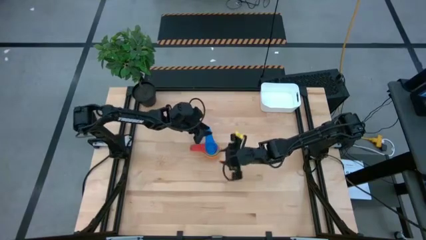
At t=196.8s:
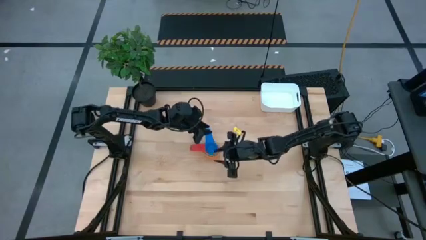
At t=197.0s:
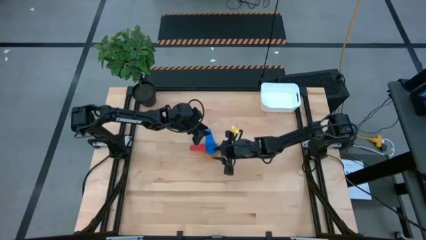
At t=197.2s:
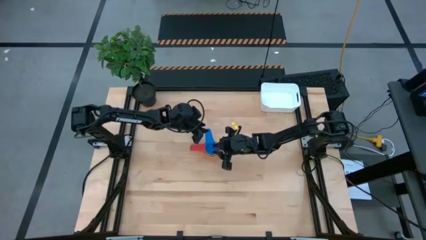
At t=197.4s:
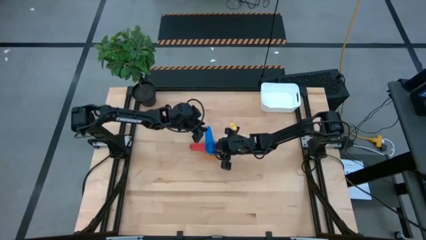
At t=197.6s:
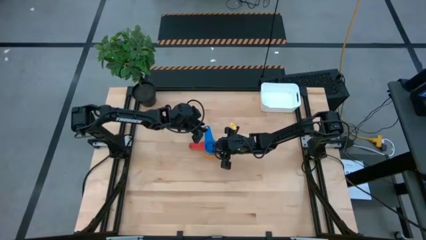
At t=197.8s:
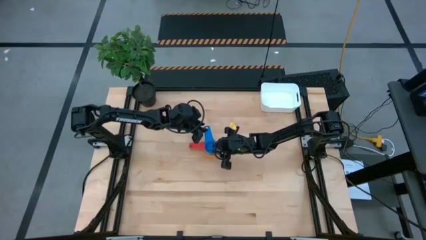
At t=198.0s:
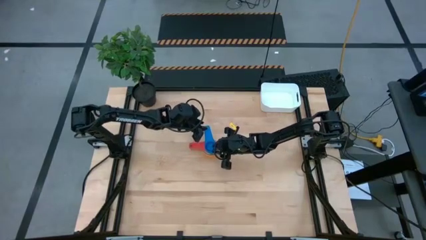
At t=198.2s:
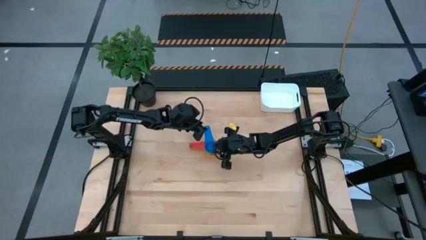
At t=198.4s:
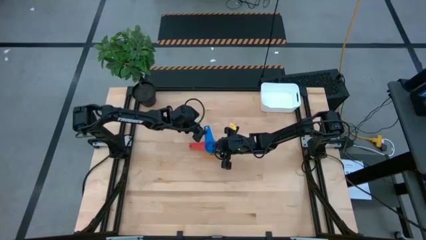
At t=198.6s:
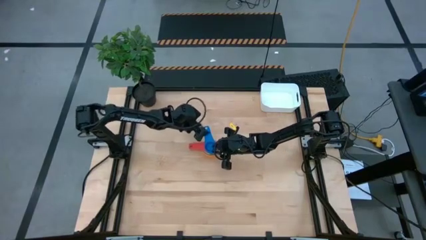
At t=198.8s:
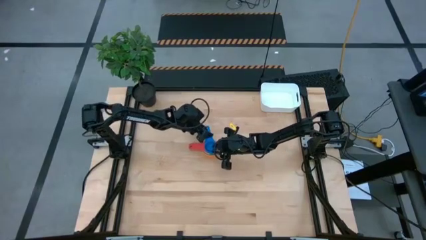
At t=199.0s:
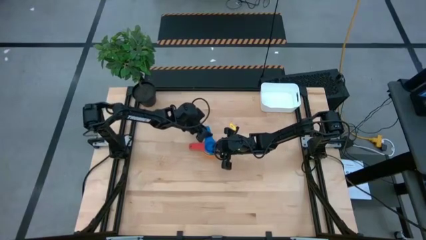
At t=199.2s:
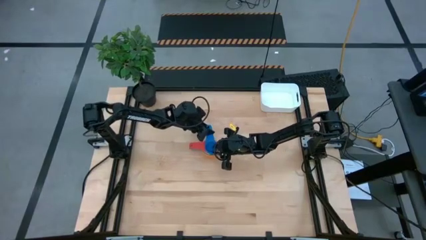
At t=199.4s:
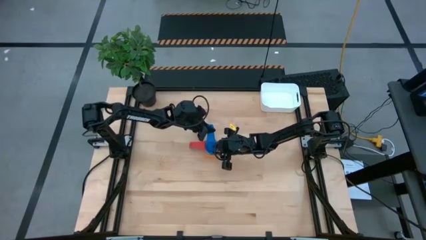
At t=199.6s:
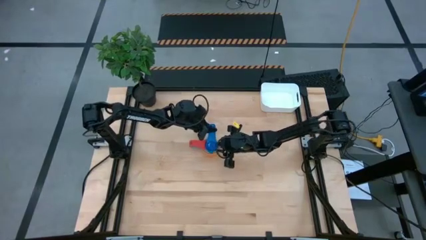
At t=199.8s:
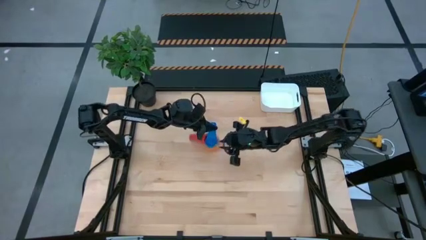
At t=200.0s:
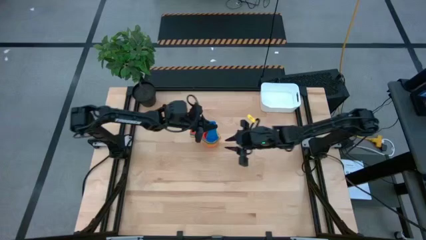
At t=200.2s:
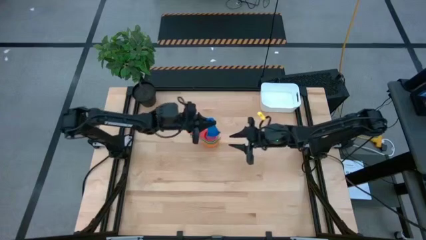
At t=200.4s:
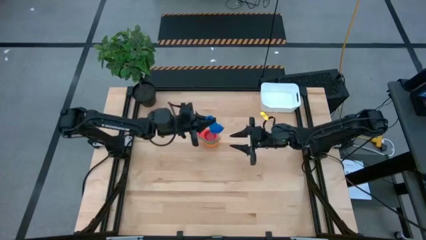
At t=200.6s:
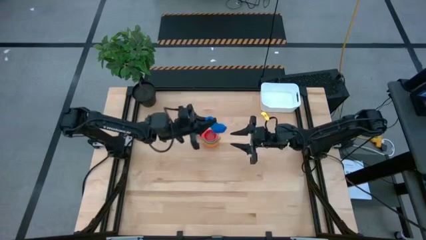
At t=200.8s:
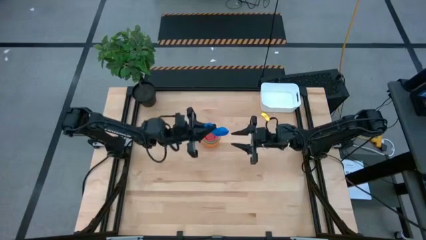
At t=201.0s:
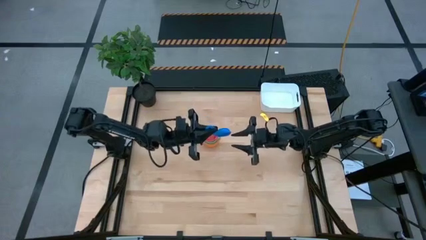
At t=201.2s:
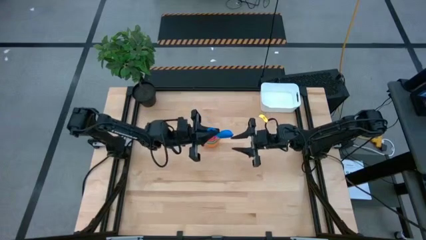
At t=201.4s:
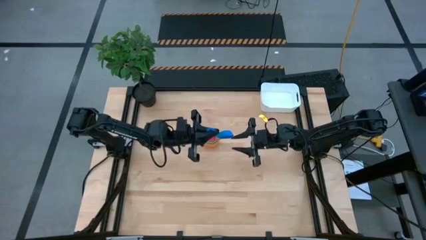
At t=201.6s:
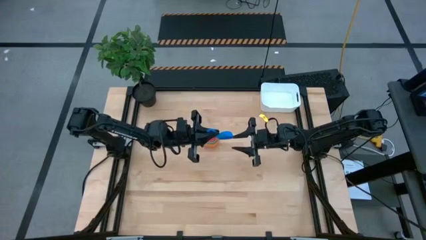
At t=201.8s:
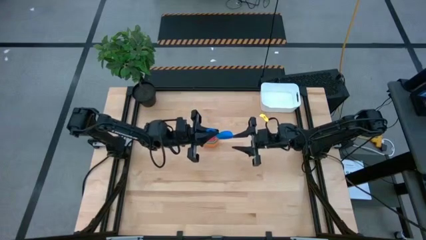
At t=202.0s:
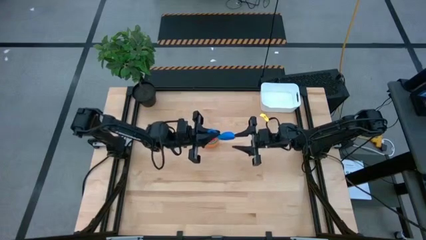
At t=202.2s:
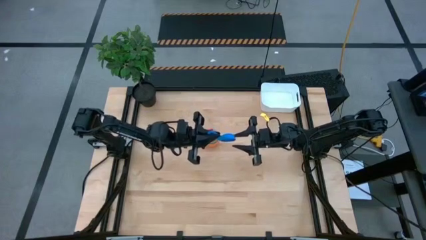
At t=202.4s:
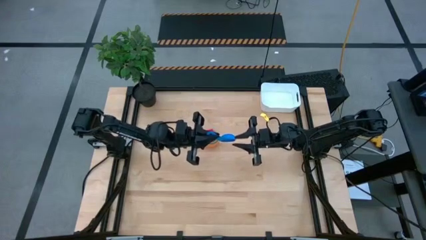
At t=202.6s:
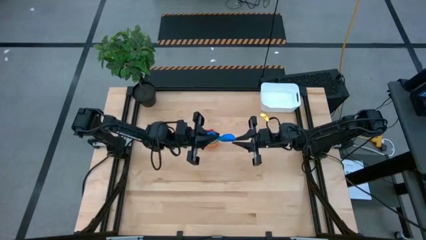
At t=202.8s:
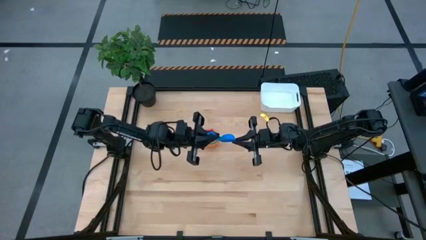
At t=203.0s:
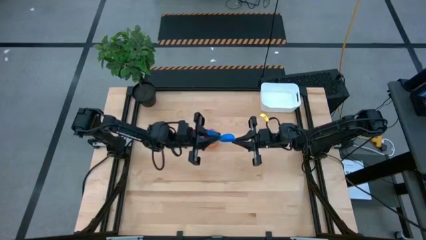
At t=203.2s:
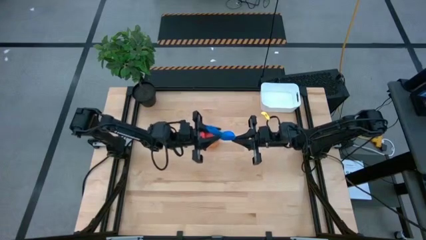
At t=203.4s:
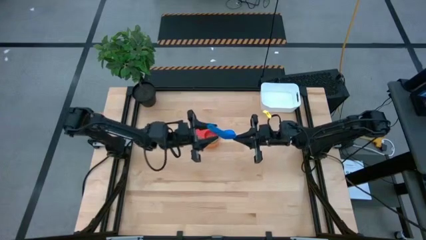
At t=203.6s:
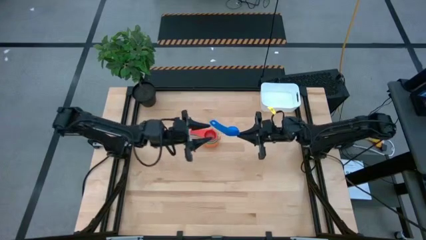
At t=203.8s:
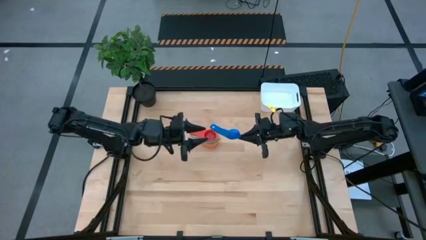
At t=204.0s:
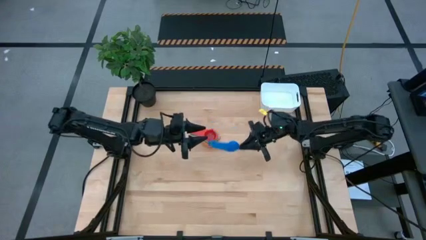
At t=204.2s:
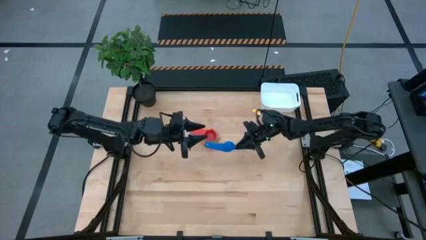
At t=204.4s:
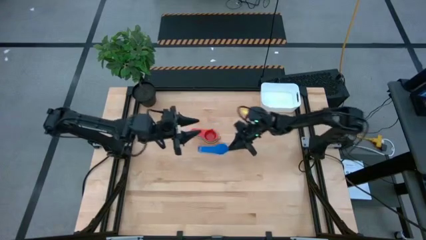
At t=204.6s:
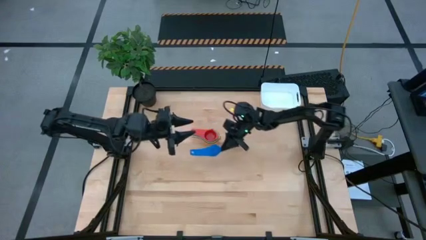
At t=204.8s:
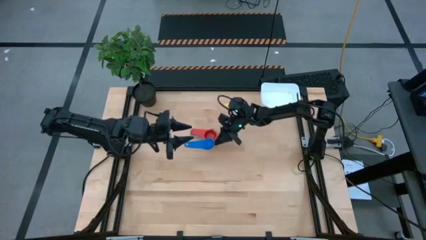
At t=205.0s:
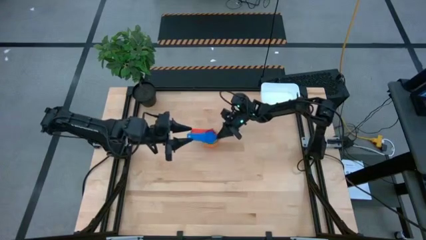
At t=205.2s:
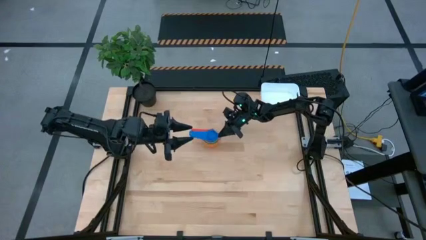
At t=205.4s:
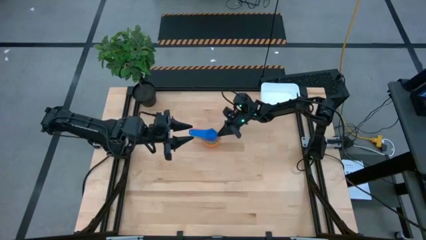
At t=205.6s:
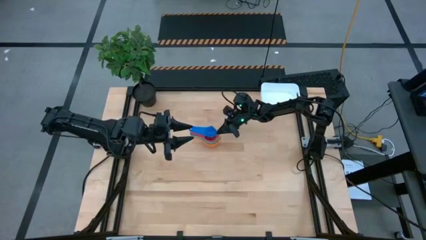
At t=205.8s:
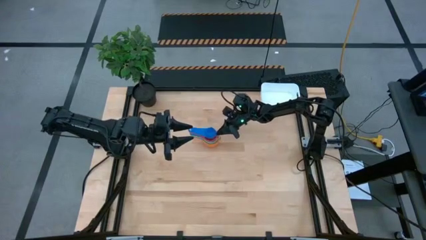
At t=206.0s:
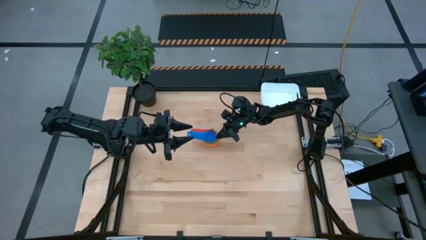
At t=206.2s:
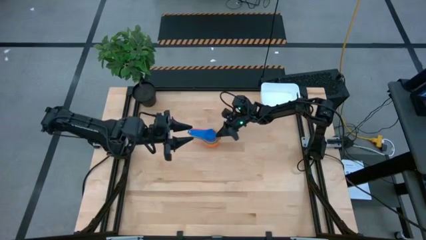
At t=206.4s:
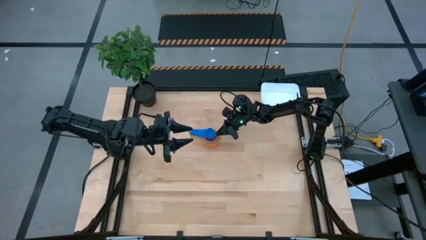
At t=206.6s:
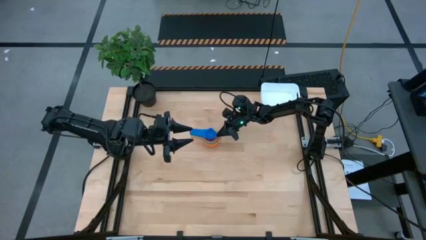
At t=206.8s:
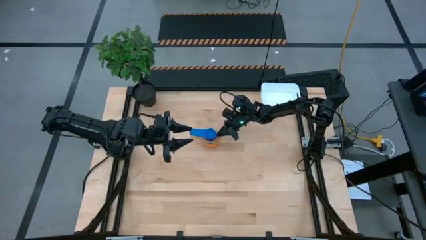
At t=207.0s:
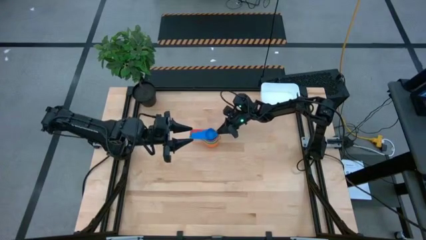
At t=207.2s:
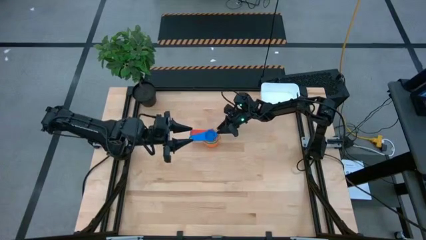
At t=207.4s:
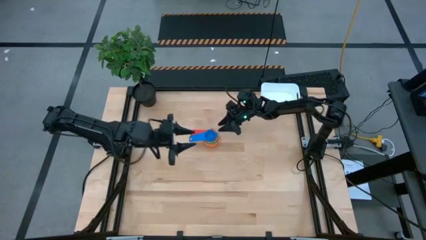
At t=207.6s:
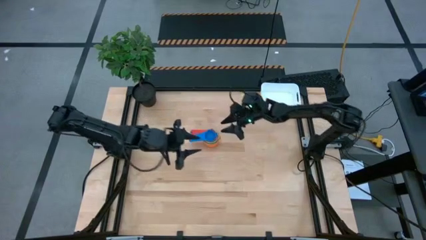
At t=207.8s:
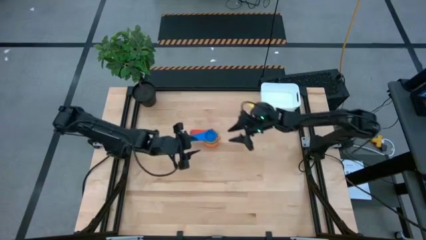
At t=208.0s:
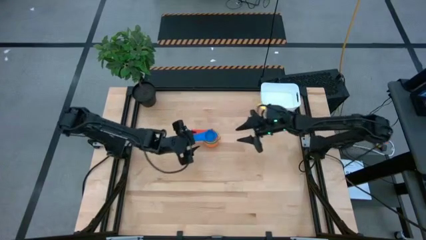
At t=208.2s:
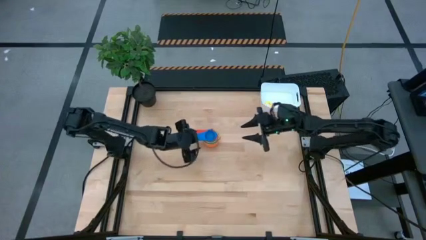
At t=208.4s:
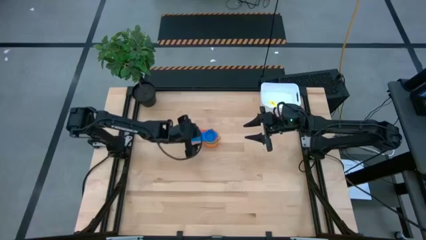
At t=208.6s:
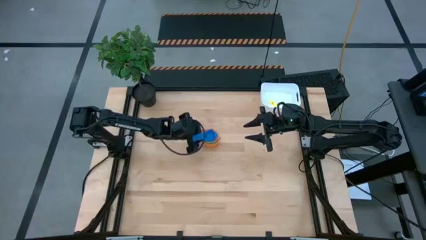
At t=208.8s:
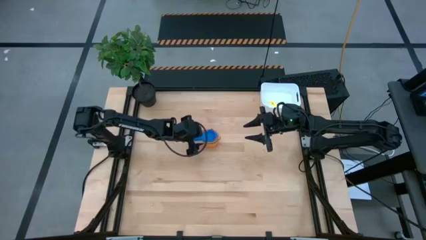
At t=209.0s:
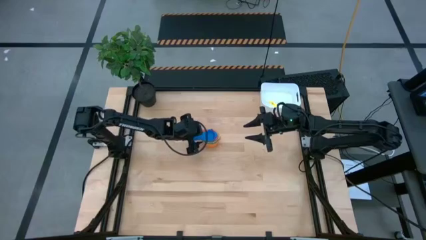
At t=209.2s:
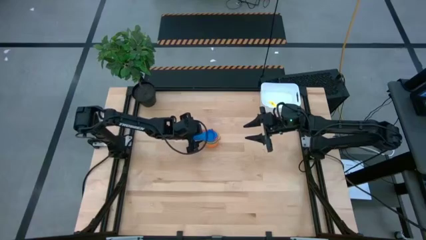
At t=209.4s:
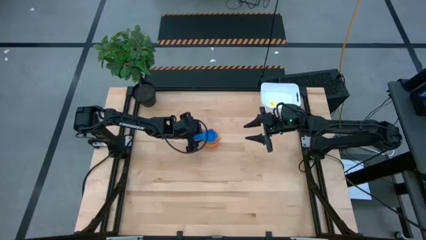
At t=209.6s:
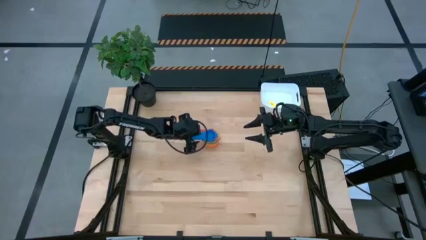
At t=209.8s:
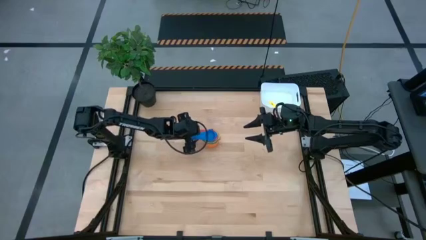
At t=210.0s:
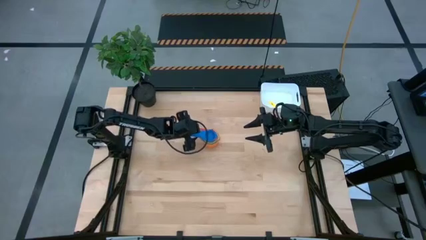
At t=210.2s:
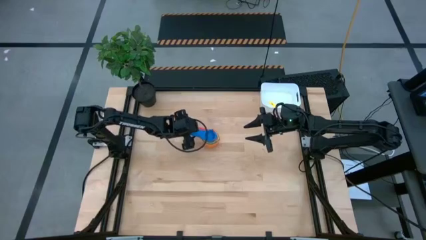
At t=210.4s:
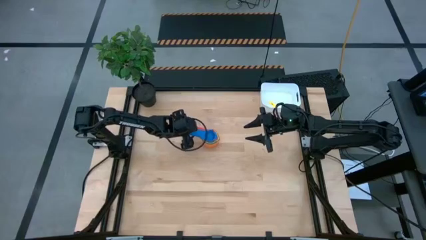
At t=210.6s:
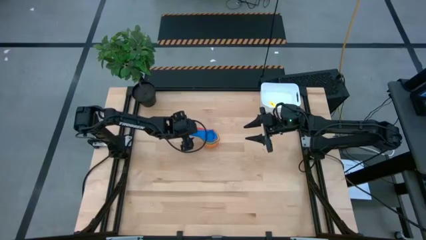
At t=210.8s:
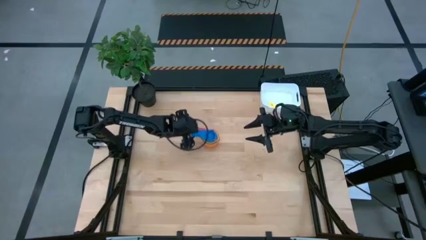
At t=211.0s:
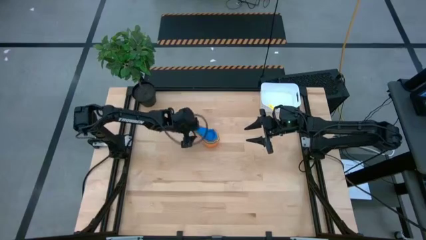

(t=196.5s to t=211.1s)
Task: Nest measuring cups in basket
Stack the blue measuring cup into the red measuring cup
